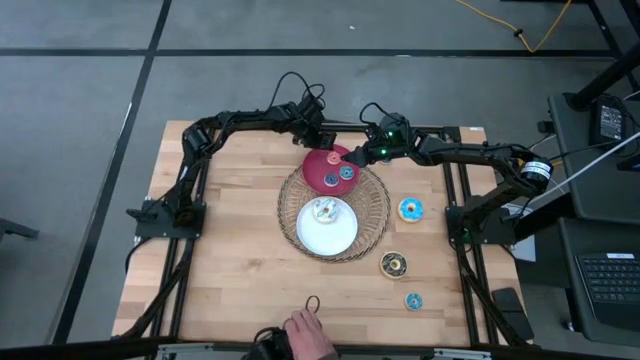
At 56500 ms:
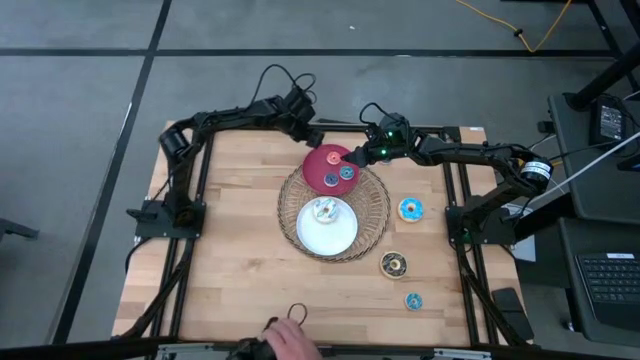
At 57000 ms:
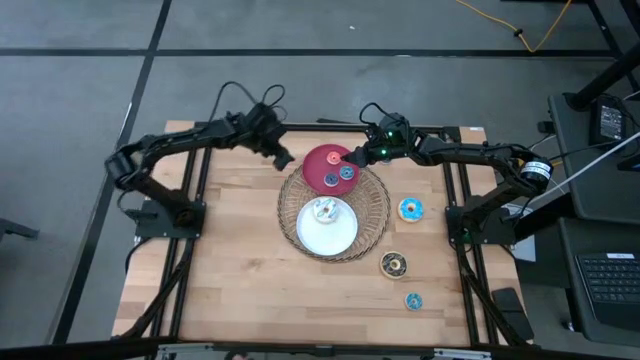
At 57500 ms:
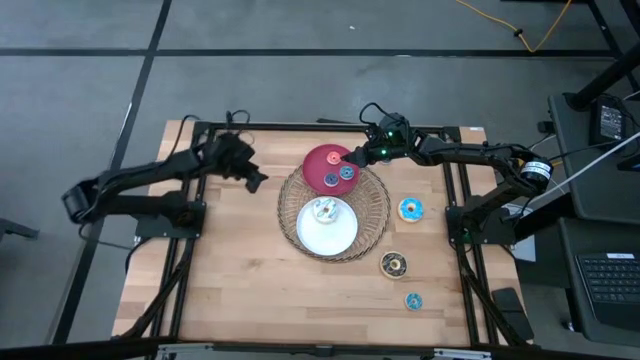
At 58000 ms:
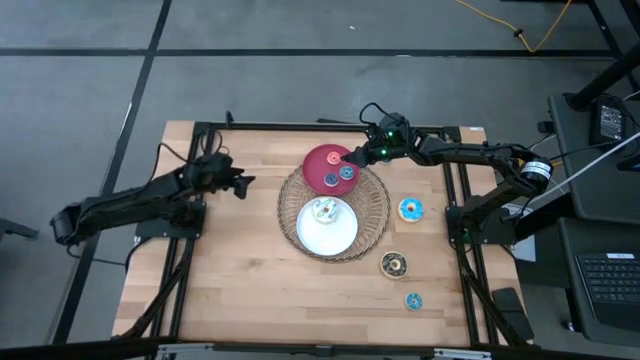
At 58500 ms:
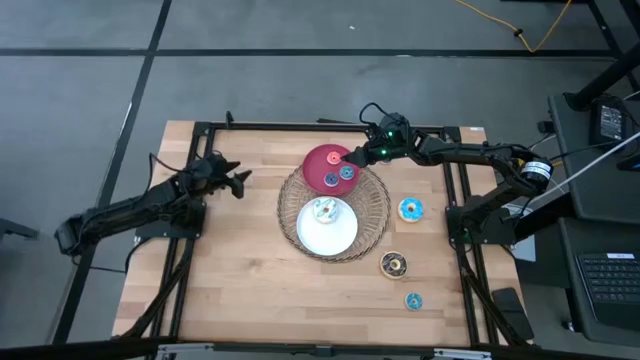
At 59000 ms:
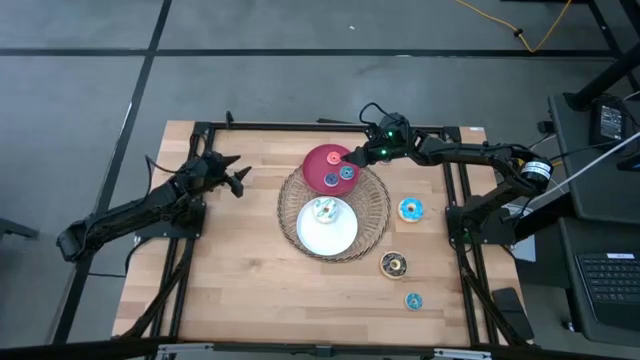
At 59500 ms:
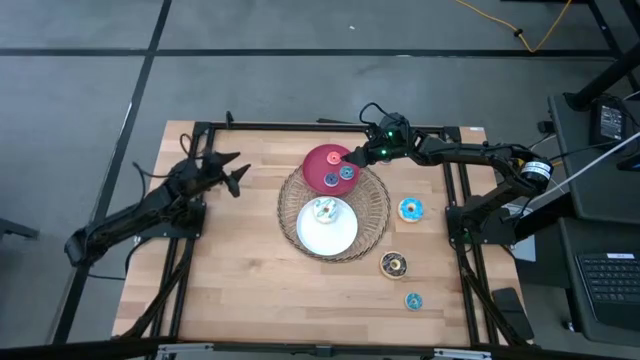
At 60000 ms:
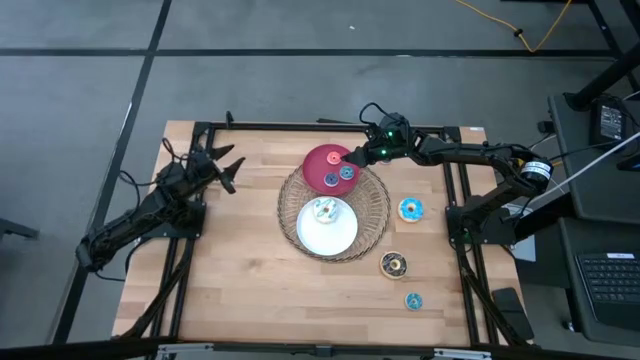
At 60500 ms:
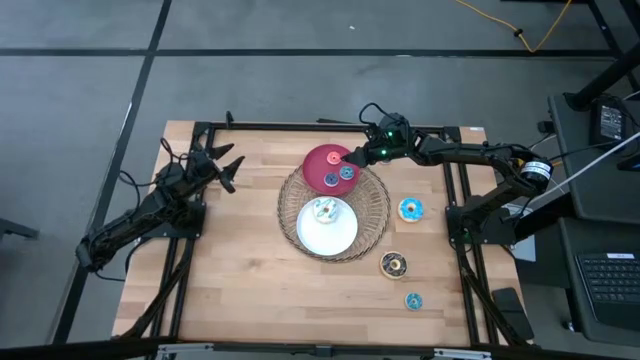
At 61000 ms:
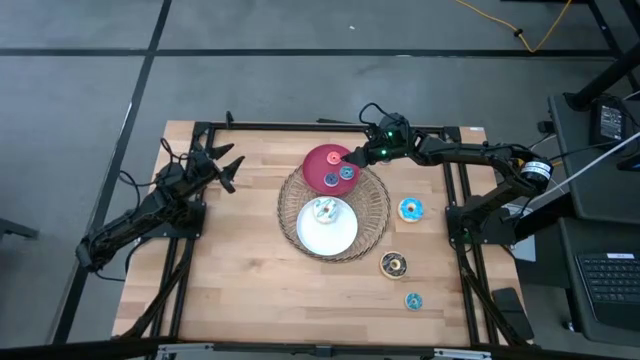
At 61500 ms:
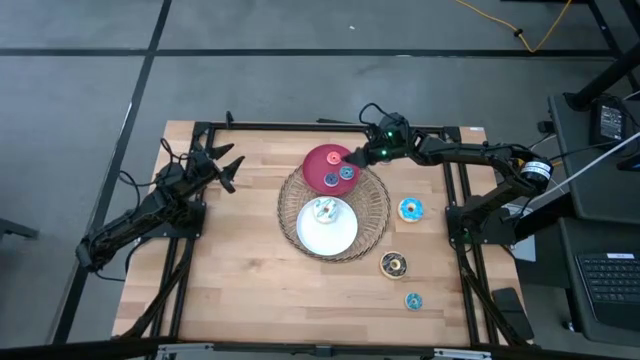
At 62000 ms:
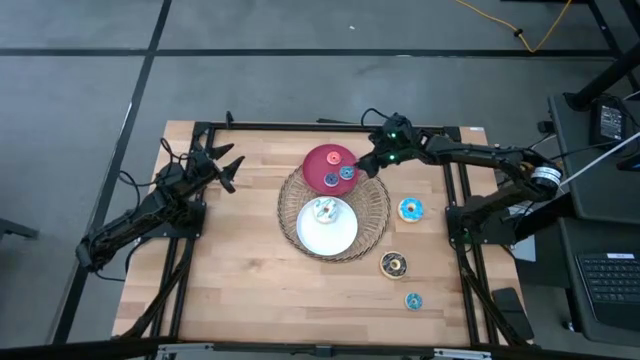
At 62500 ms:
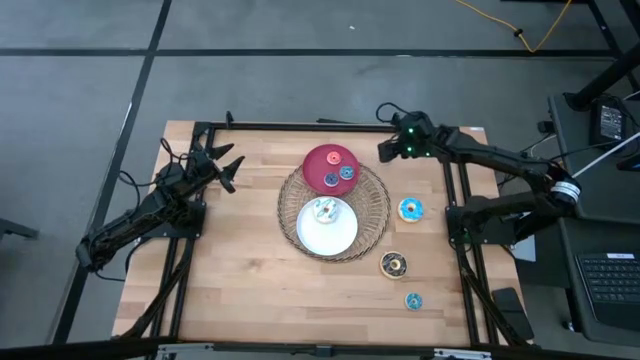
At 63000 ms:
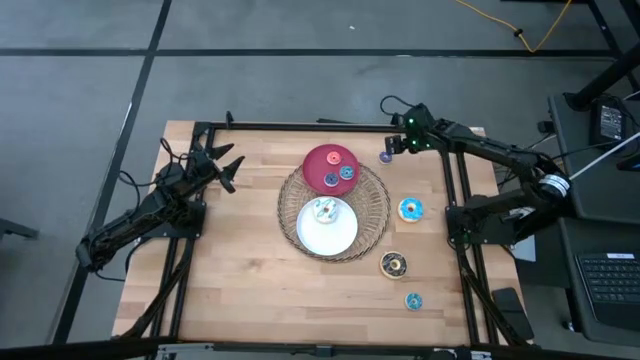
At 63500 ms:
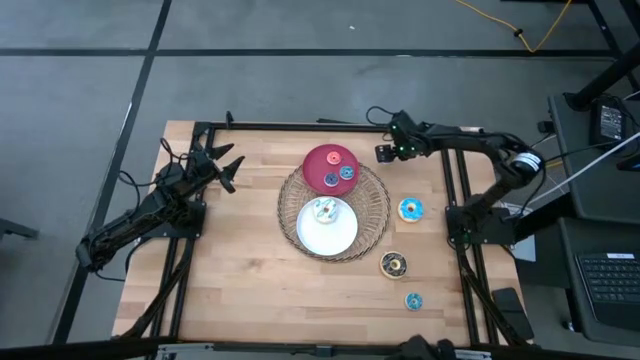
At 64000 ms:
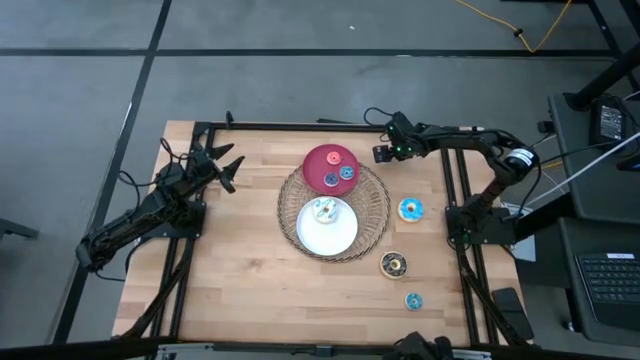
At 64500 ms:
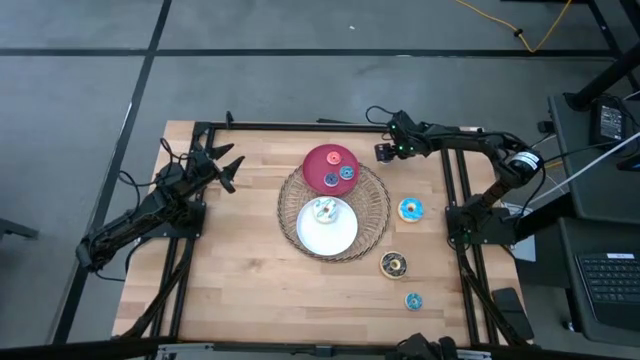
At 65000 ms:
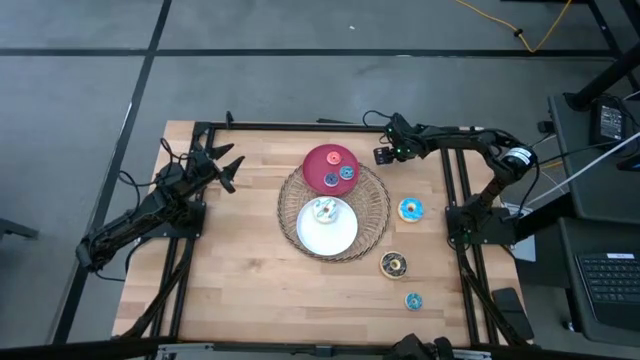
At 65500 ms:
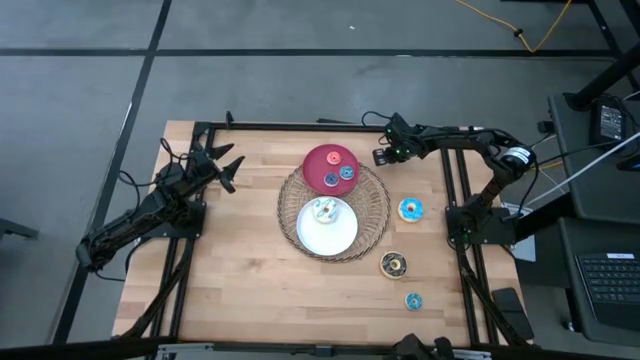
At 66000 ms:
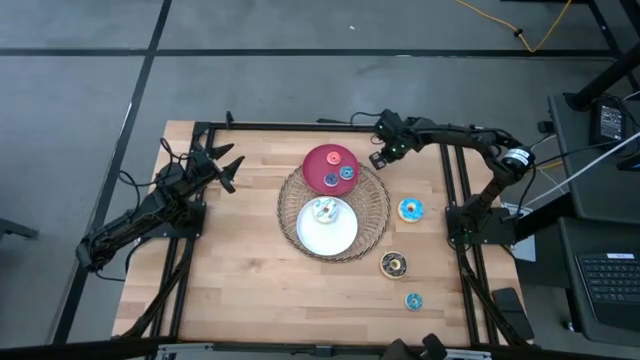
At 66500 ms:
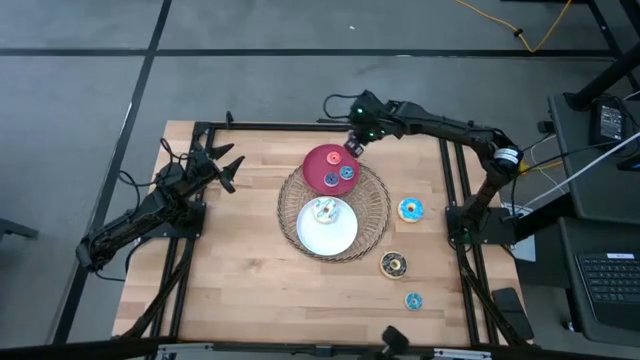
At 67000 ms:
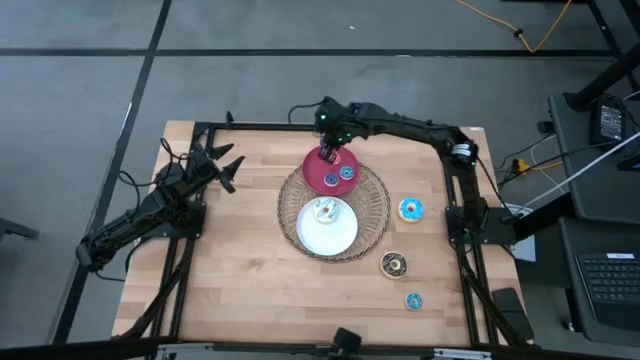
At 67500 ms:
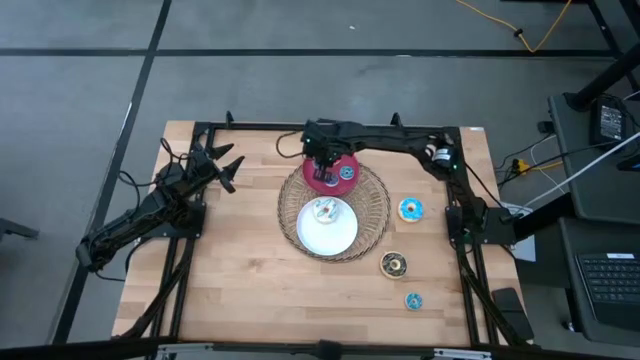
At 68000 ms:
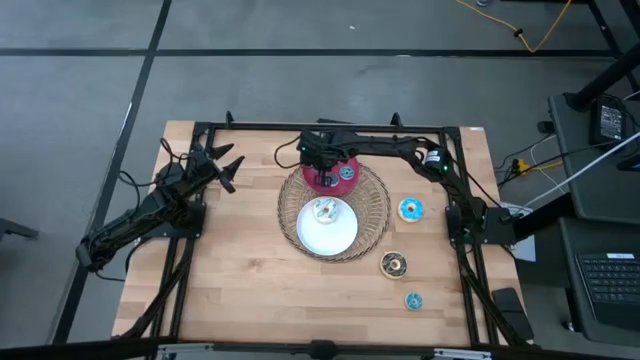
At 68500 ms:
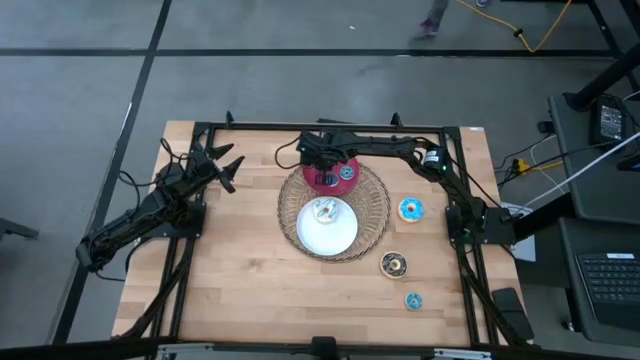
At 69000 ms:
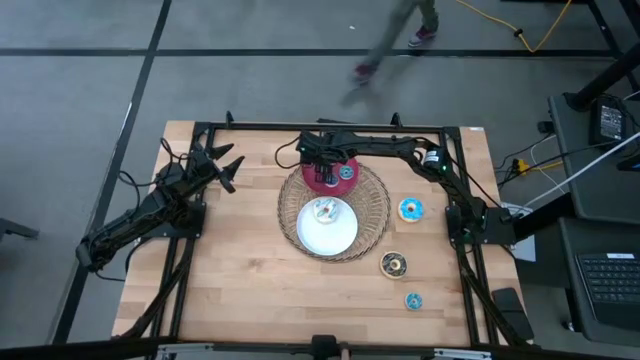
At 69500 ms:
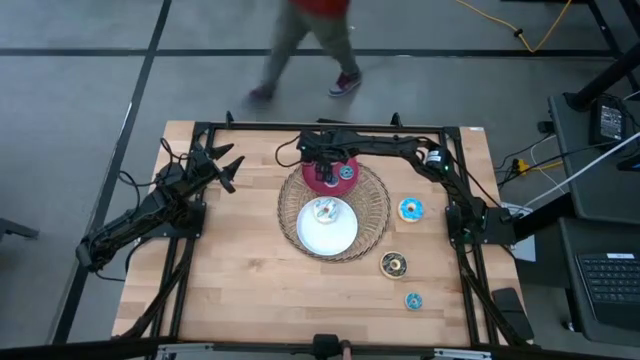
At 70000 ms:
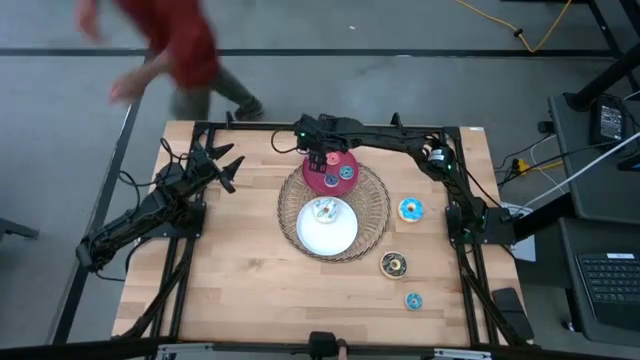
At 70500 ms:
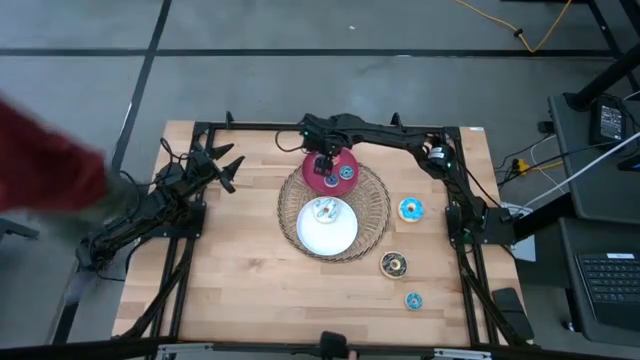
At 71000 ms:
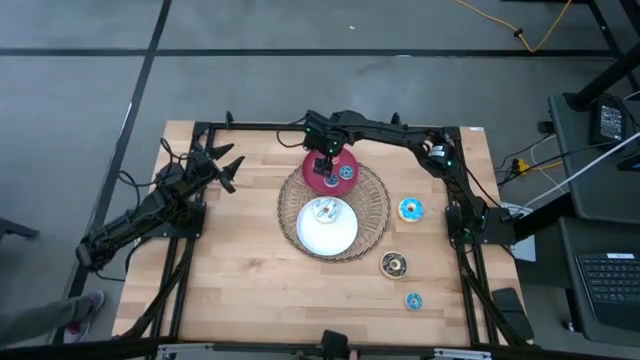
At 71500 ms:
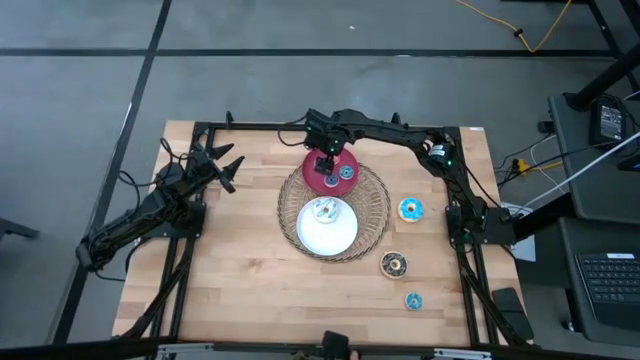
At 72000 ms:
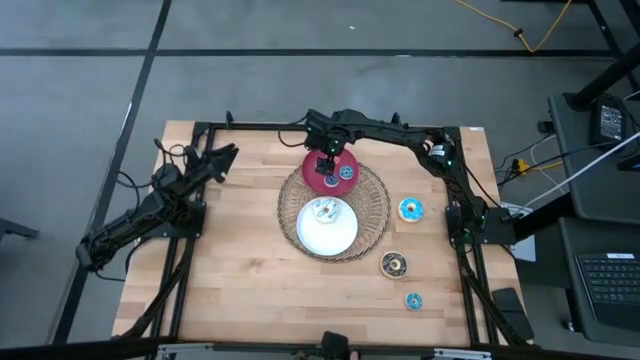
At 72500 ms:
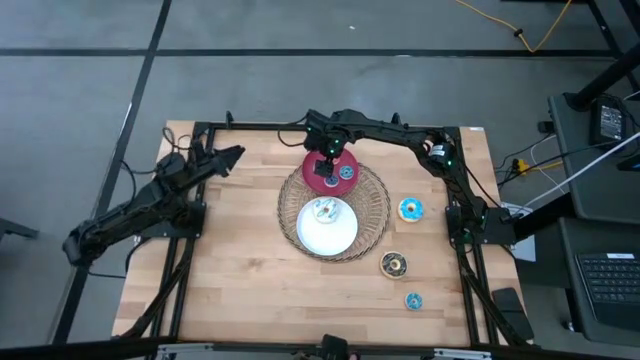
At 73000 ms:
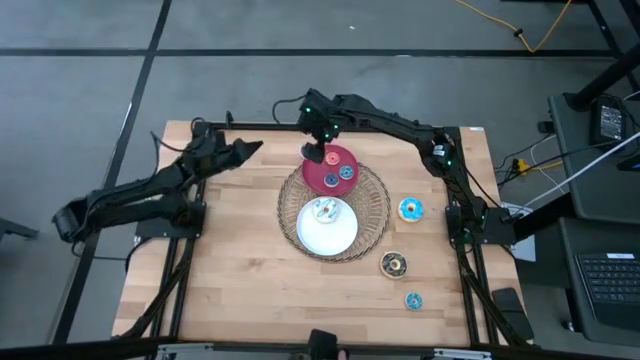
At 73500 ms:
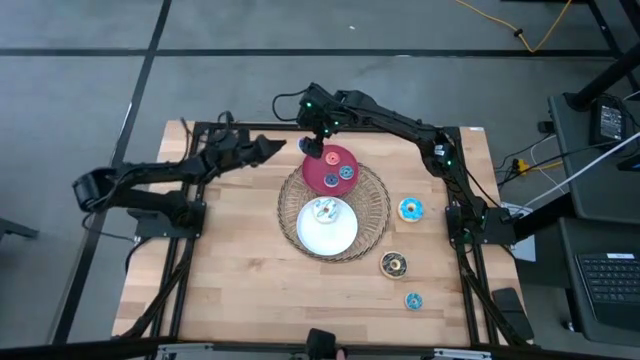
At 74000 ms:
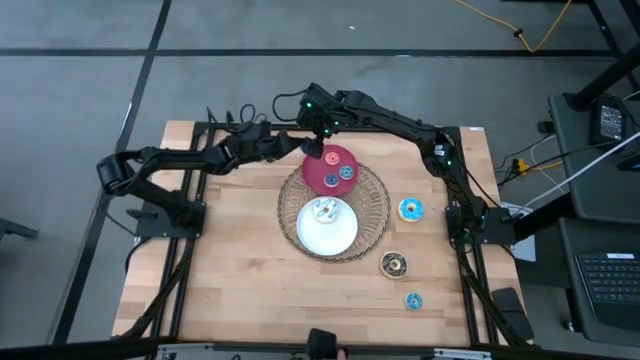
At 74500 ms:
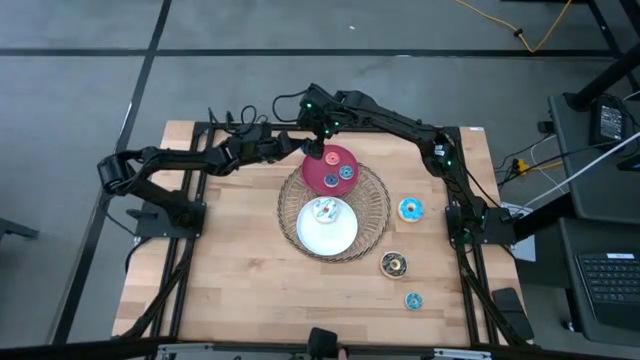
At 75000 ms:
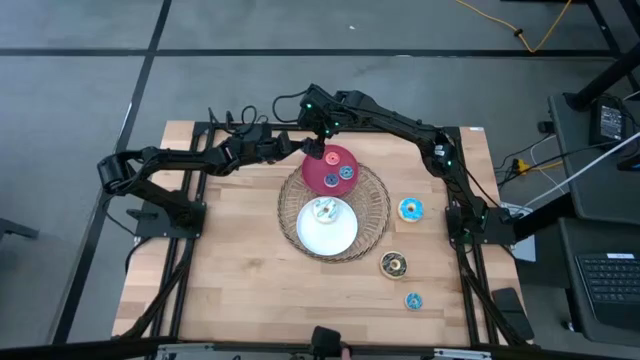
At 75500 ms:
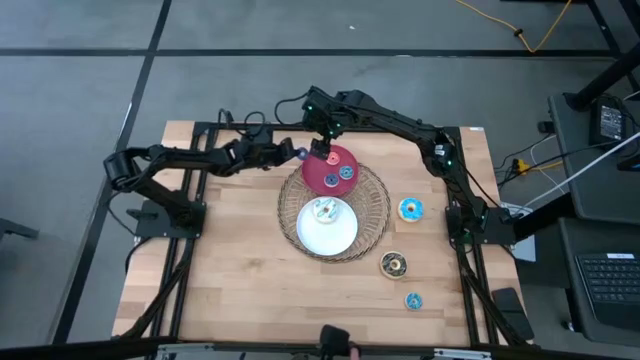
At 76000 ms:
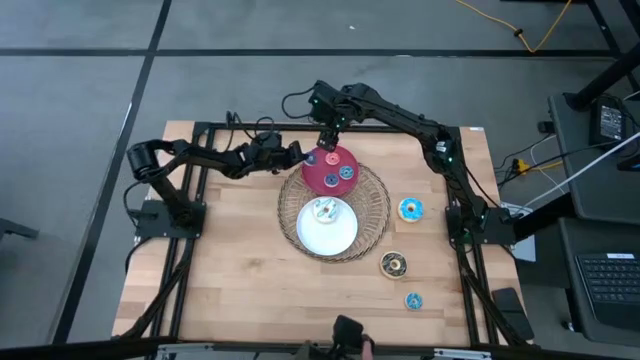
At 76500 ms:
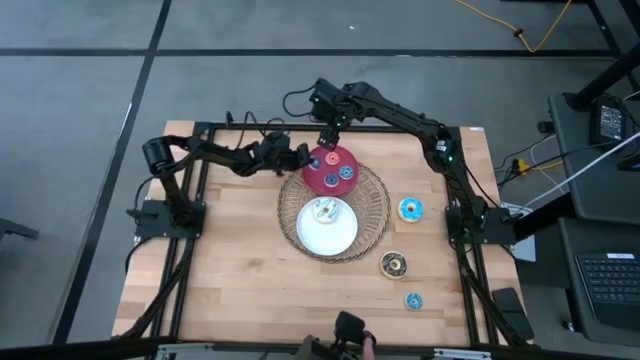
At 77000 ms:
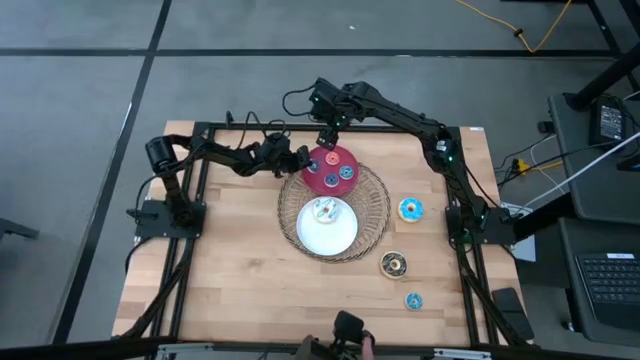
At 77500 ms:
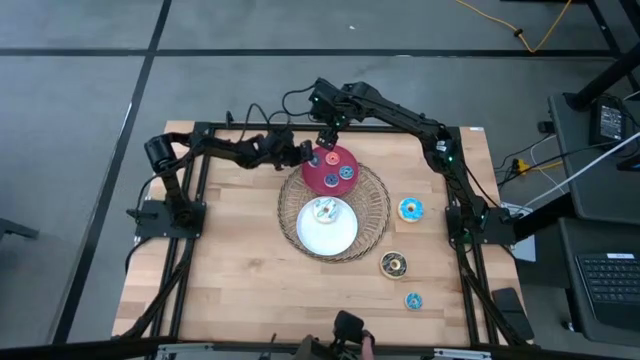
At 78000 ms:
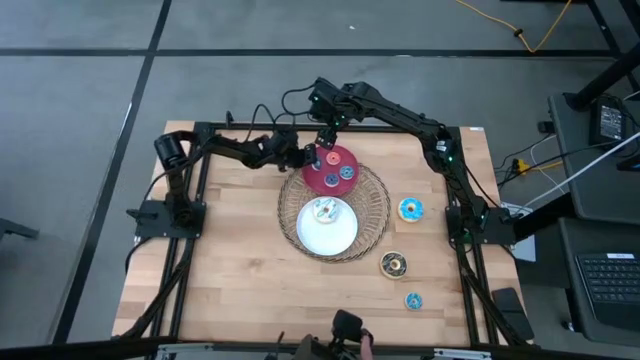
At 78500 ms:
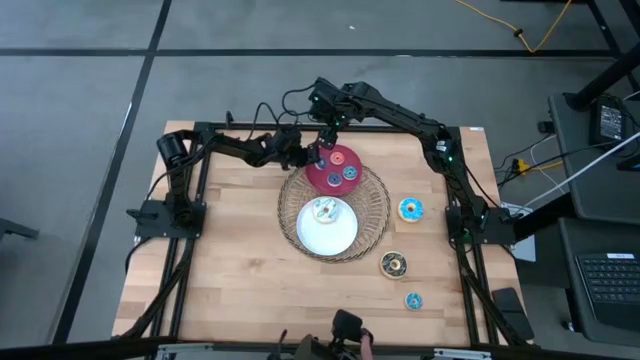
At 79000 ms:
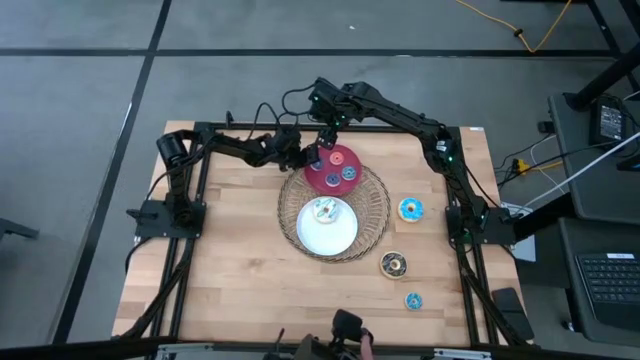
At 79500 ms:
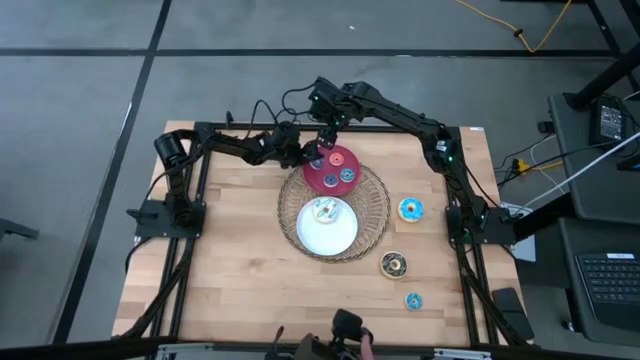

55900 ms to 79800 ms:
Task: Pick & Place donuts
Put the small blue donut on the red plate
